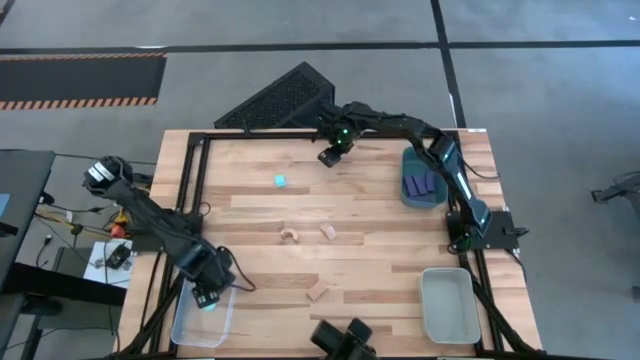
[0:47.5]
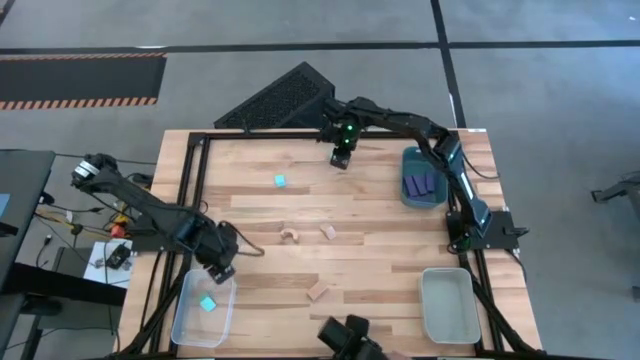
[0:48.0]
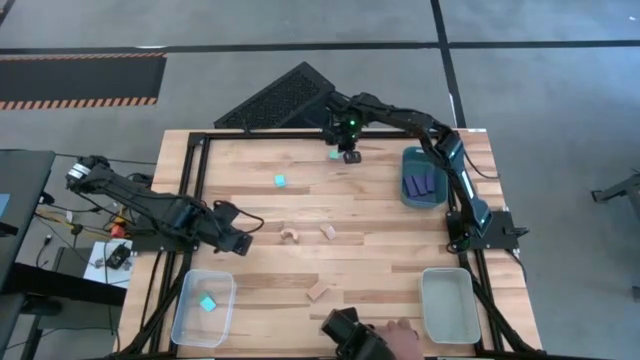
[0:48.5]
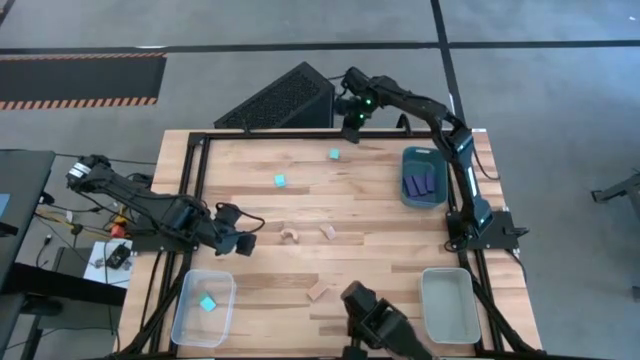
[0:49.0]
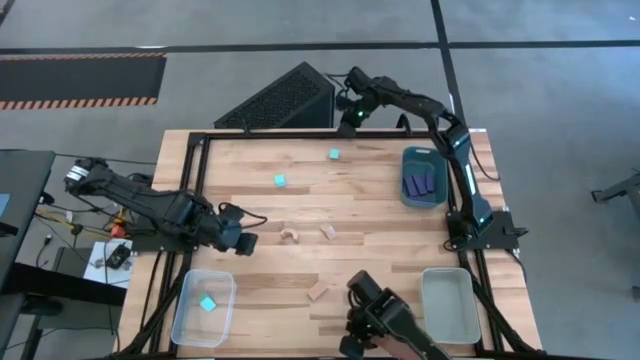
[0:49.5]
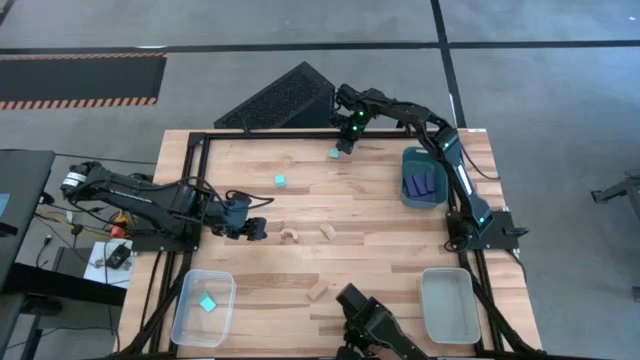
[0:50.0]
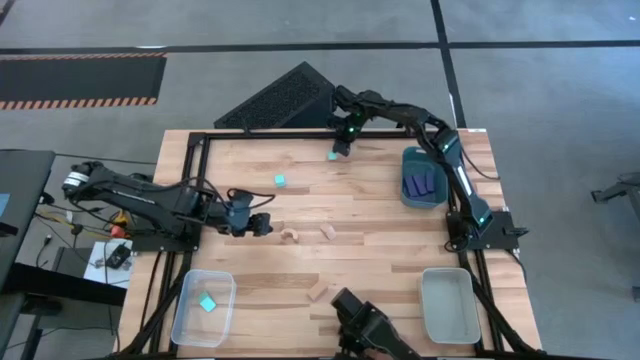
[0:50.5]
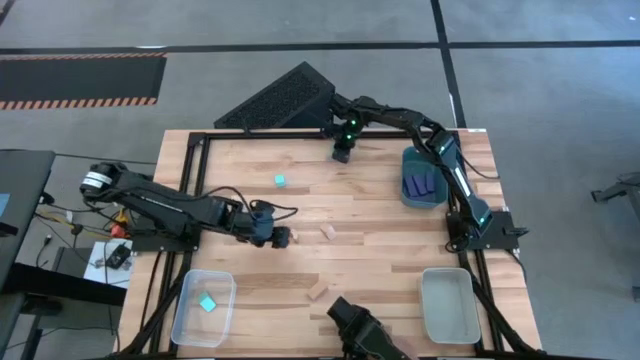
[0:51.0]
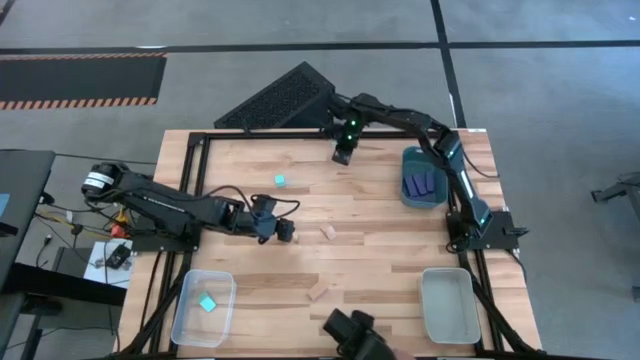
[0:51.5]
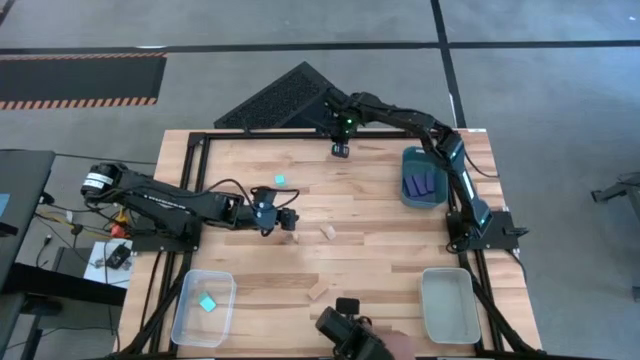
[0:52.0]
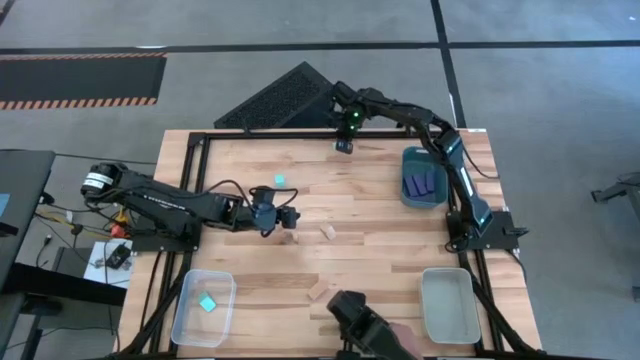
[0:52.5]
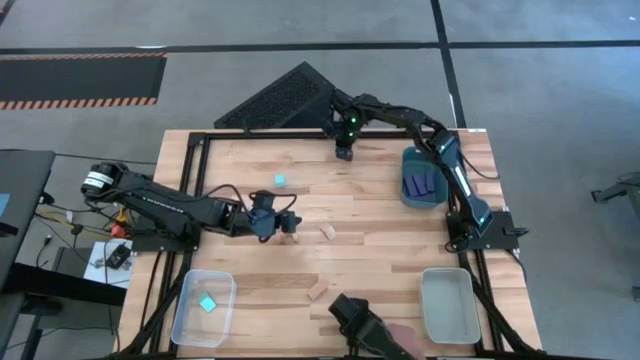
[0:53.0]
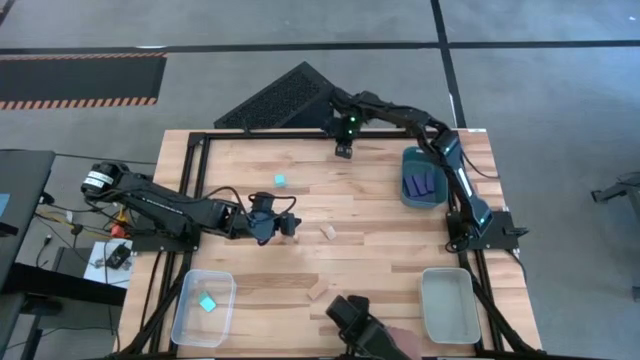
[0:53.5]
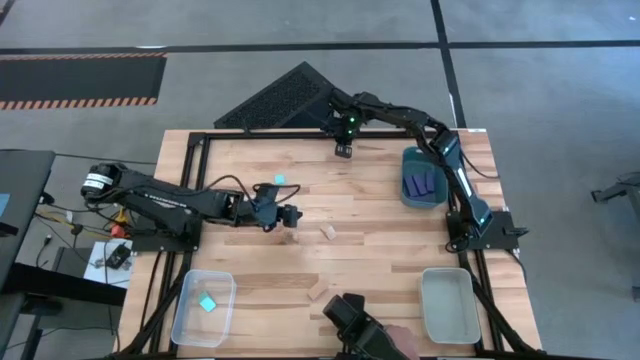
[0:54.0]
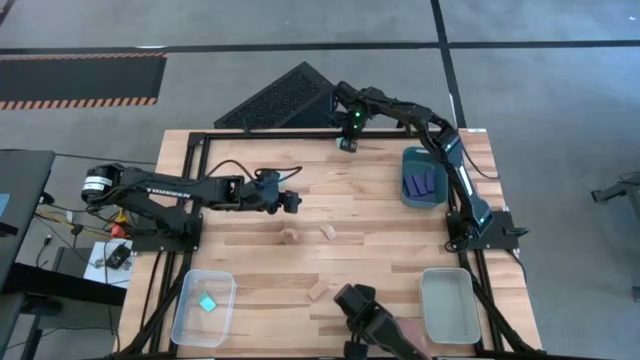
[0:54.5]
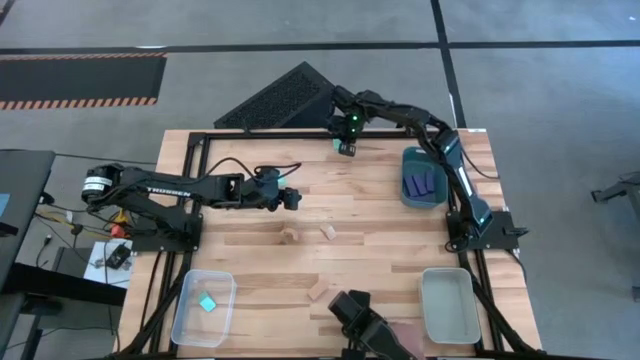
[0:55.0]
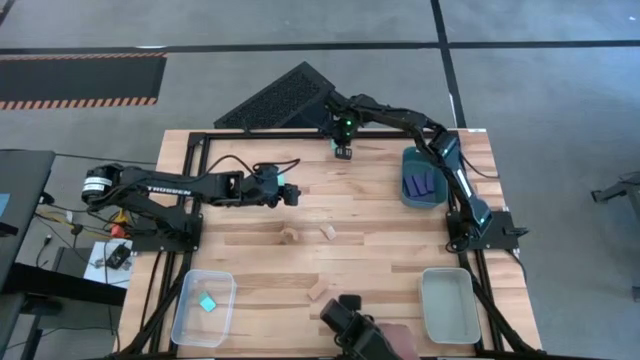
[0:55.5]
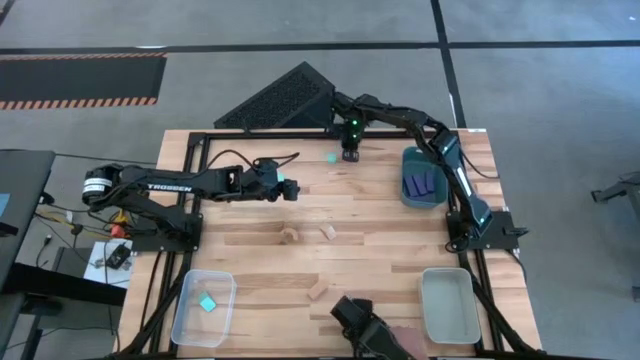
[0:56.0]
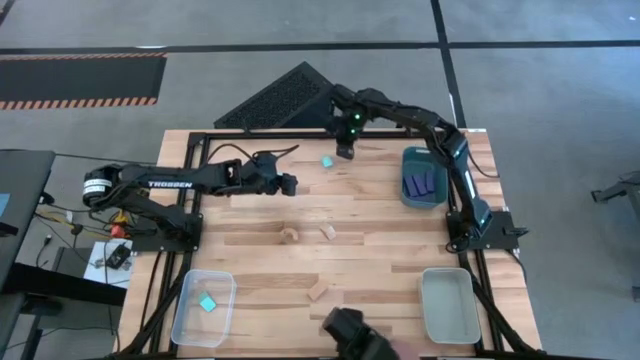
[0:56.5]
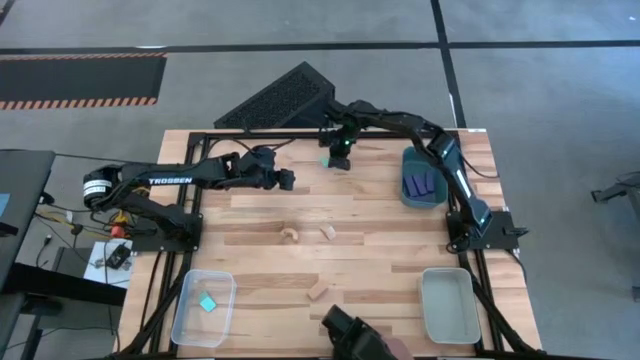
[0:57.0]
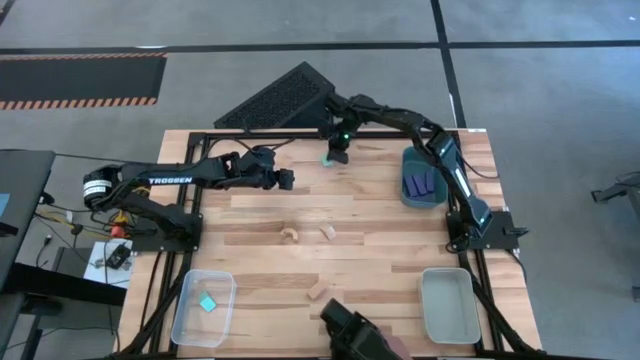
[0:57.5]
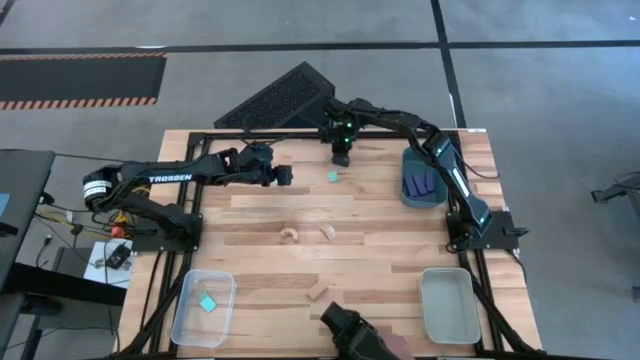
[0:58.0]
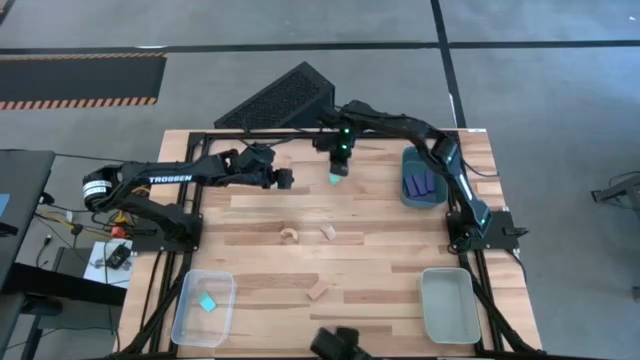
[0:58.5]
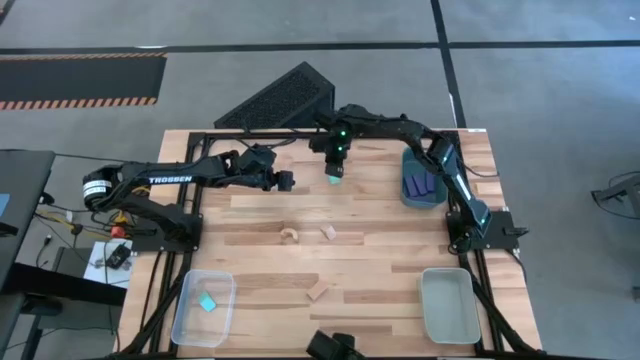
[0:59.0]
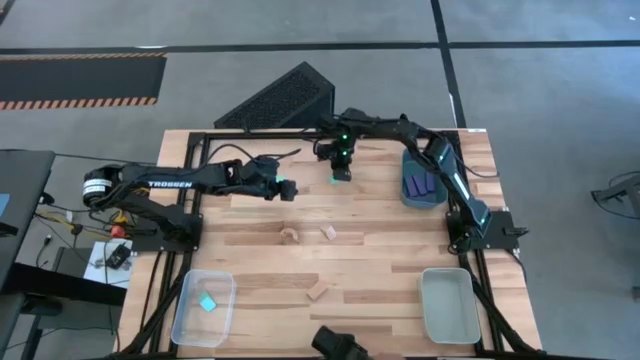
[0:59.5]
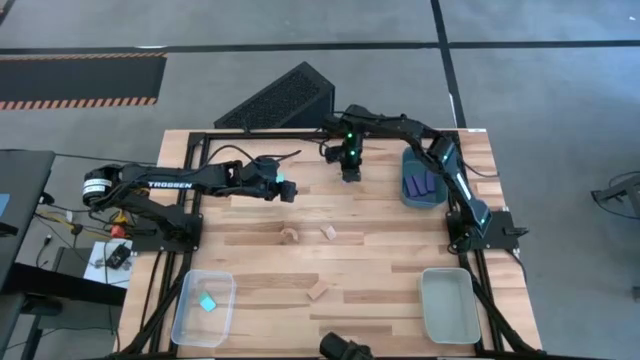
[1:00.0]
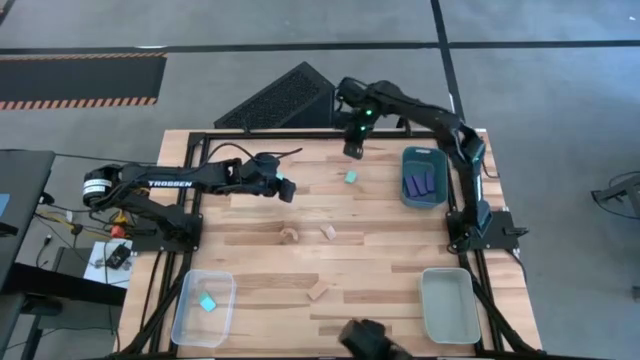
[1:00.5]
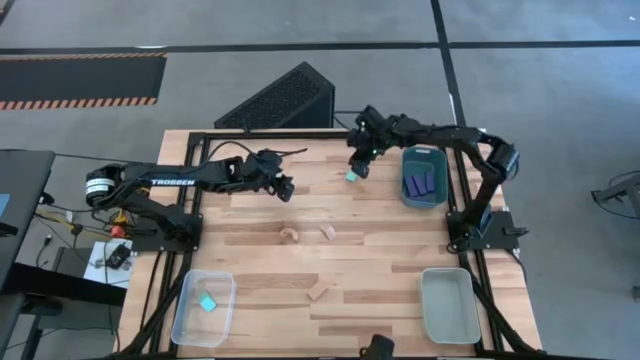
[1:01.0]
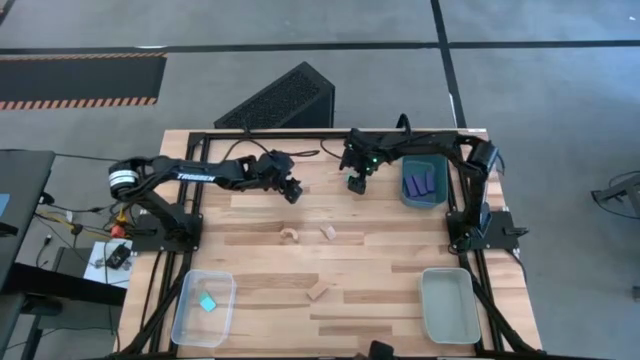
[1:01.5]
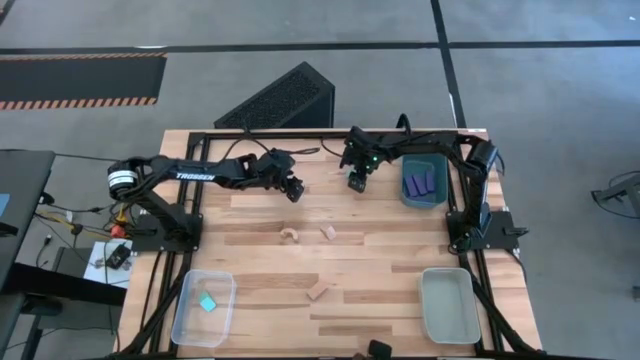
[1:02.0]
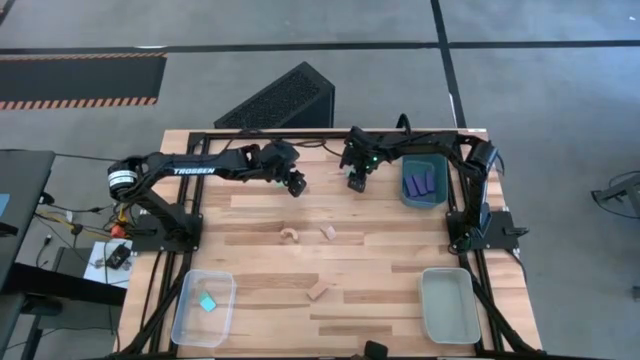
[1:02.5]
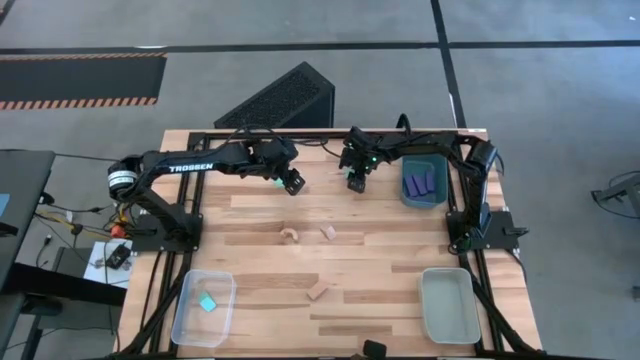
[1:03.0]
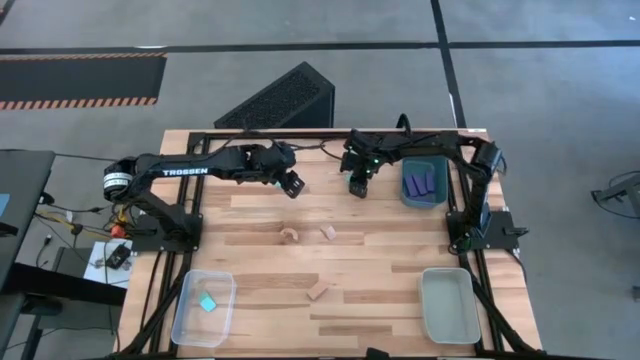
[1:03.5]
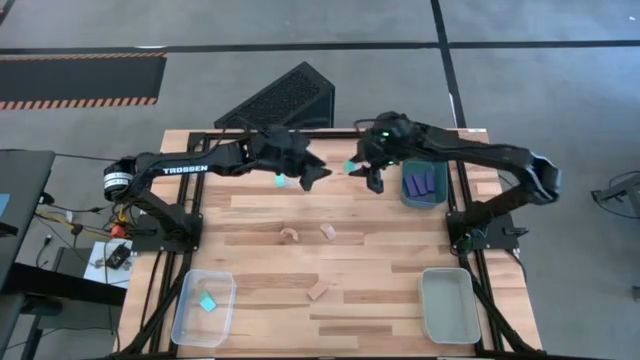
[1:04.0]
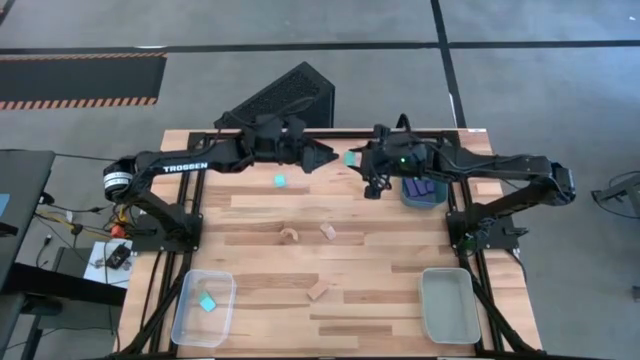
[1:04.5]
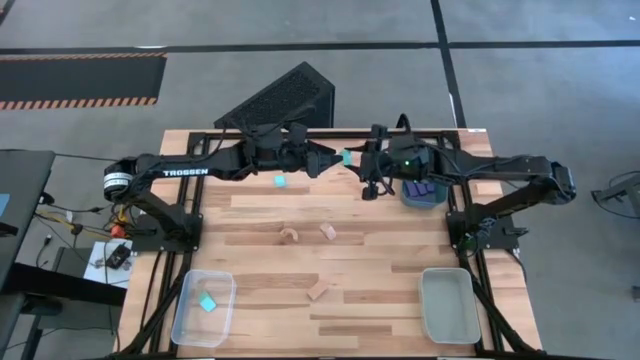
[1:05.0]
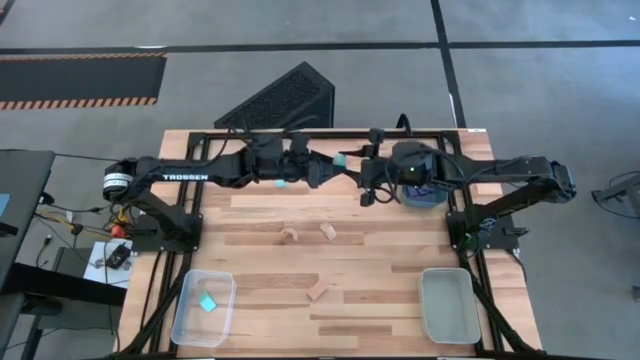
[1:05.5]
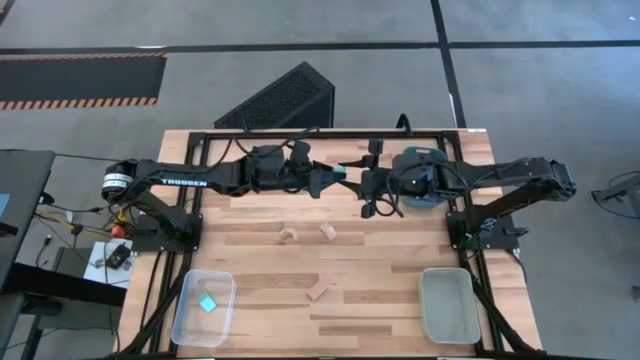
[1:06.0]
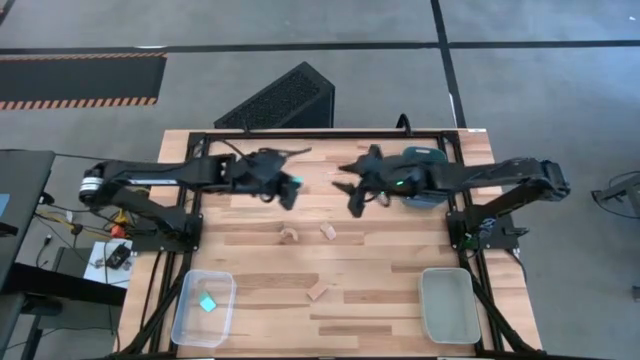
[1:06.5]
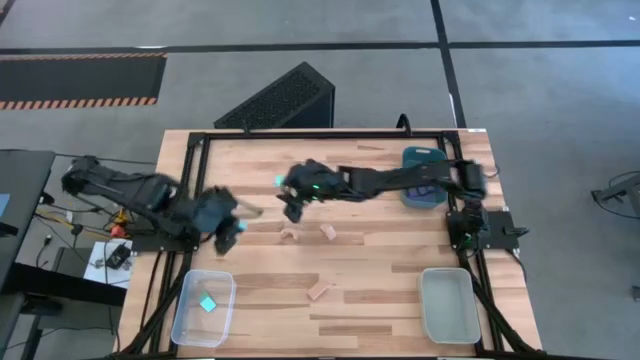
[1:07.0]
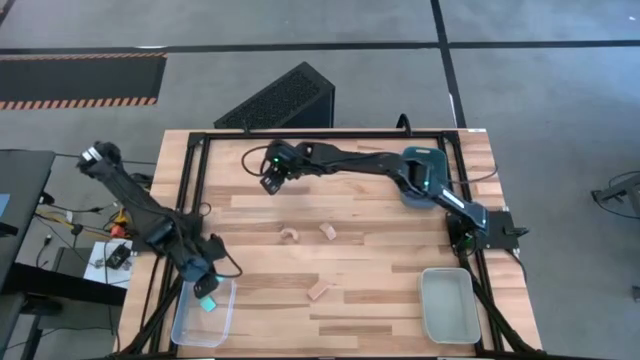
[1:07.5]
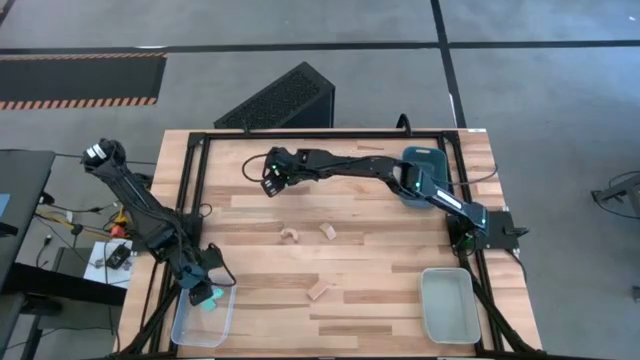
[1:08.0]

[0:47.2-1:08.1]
Task: Sort & place blocks by color
Put the light blue block into the transparent bin
